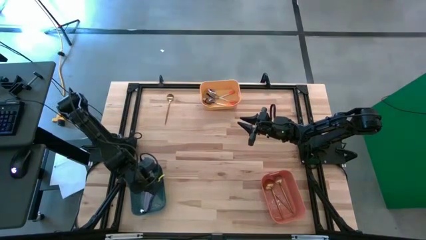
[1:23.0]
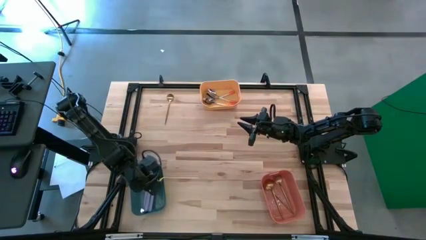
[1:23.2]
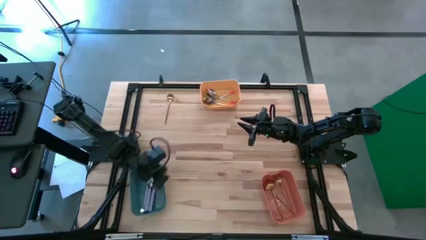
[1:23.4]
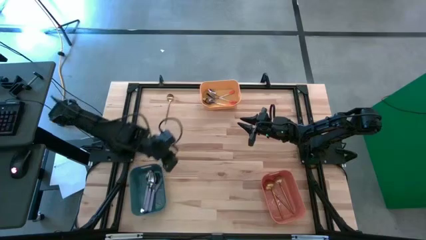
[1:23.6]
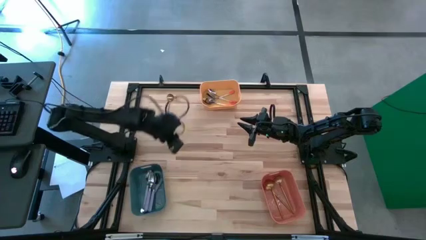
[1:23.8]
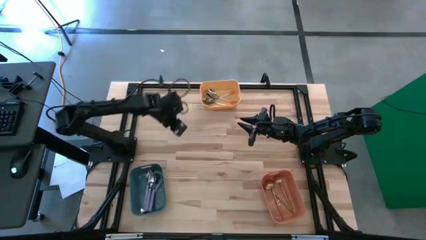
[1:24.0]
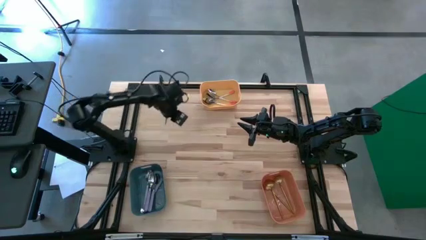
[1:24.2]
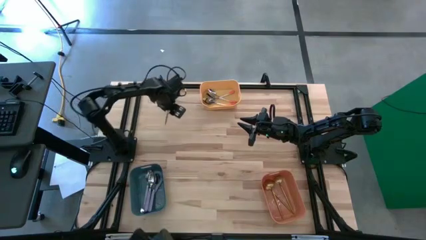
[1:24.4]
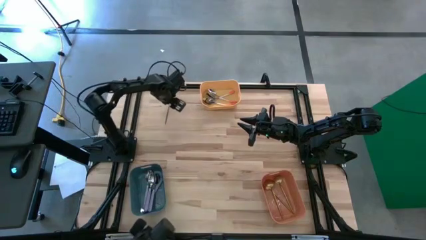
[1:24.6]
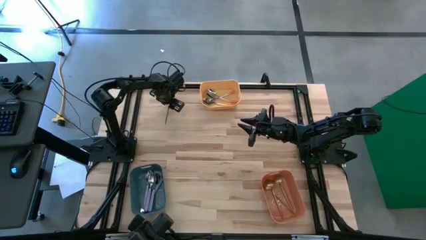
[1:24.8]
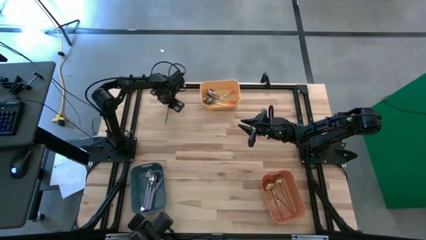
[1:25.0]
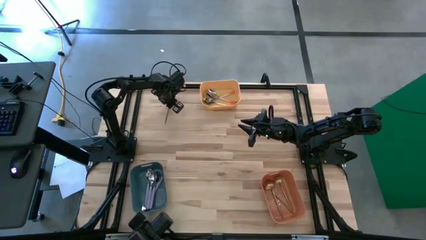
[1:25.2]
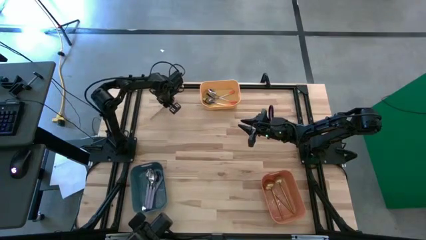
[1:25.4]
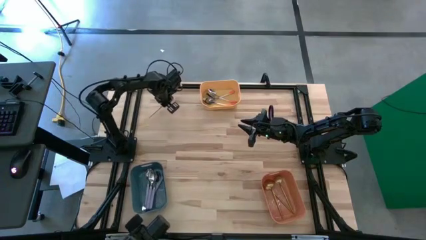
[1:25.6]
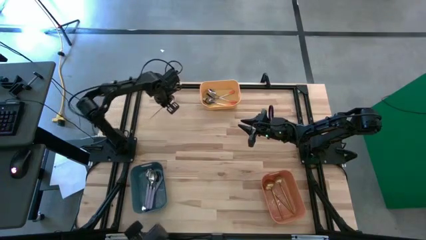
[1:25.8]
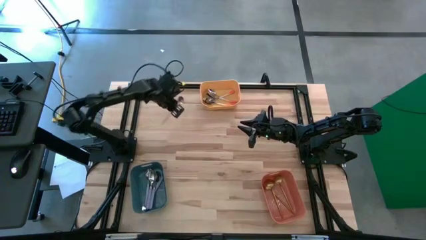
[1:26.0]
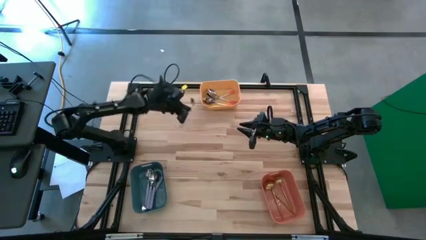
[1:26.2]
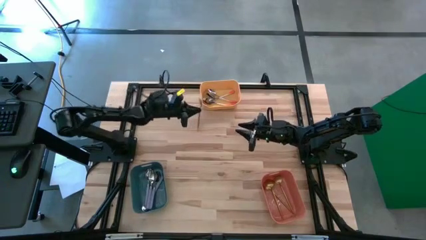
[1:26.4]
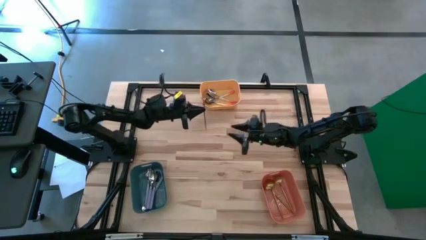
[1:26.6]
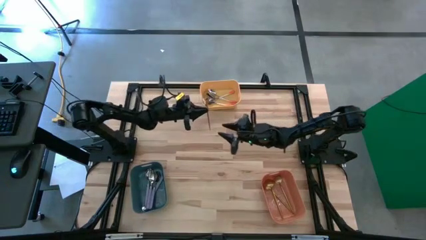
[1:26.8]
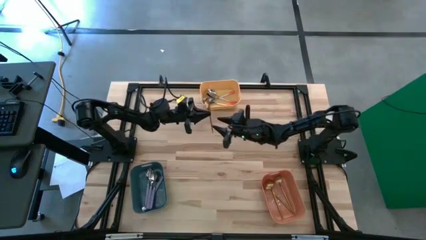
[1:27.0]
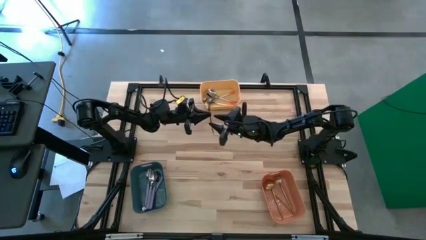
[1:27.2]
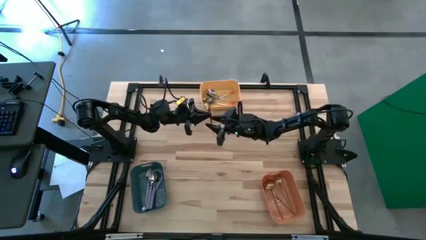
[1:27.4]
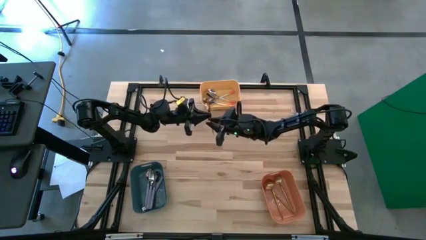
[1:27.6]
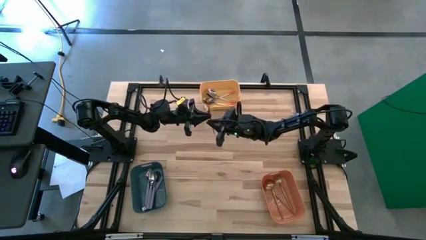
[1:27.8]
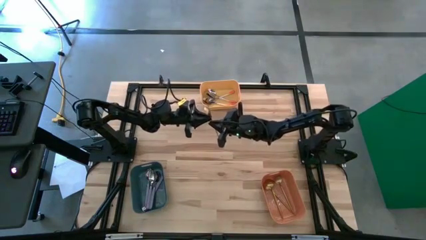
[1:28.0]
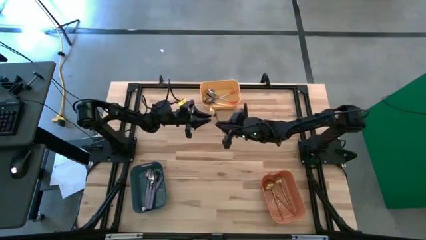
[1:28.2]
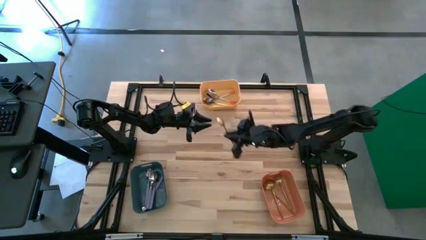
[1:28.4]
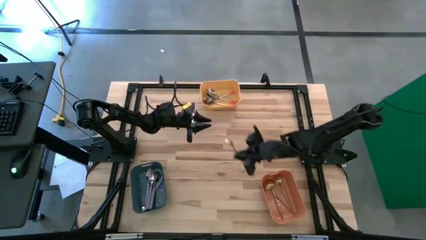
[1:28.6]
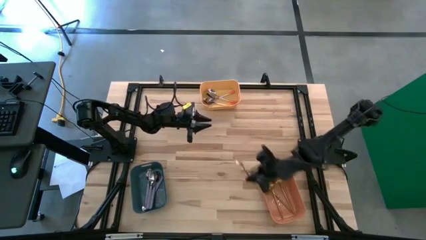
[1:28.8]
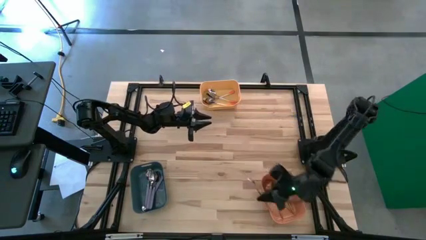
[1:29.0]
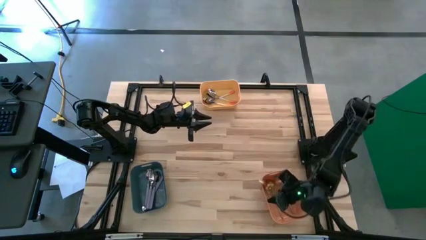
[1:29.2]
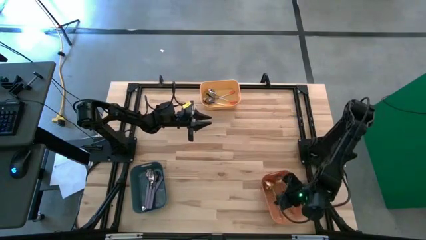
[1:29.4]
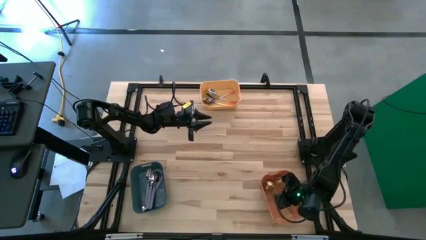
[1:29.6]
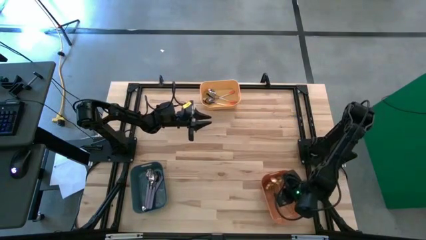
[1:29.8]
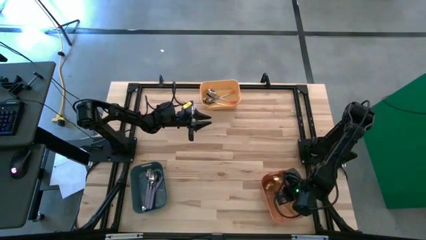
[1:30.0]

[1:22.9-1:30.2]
Task: Sort silverware by color (type)
Put the golden spoon into the orange bin

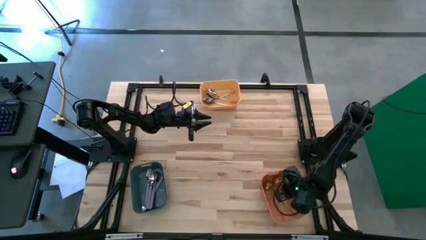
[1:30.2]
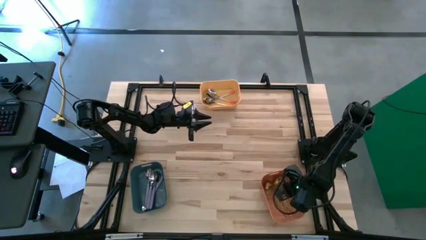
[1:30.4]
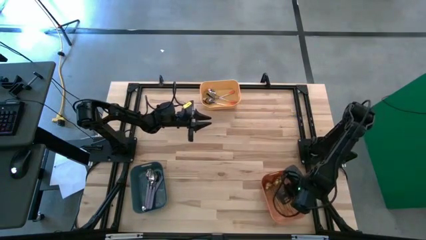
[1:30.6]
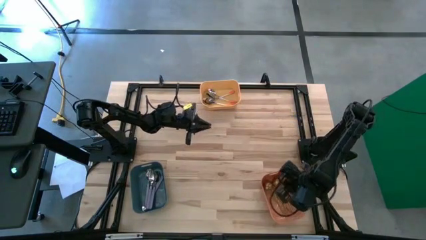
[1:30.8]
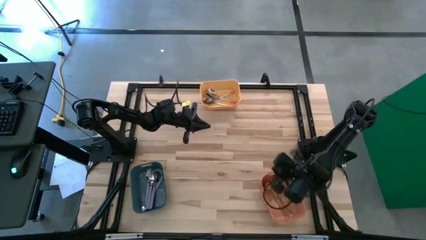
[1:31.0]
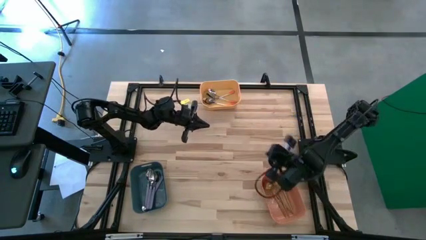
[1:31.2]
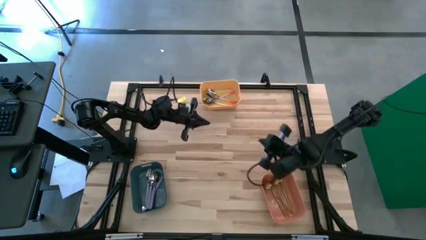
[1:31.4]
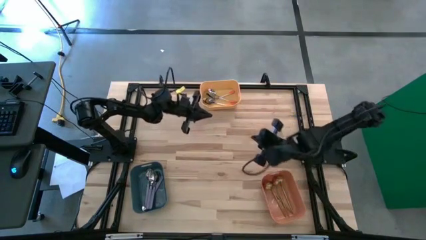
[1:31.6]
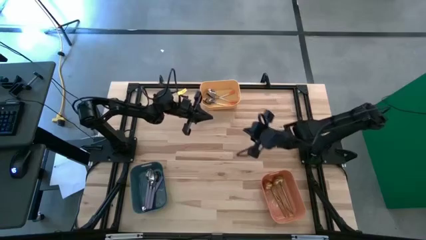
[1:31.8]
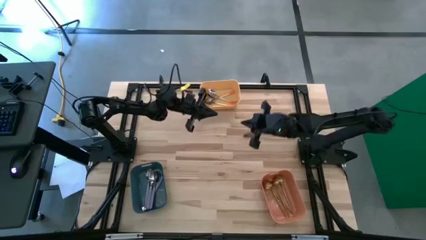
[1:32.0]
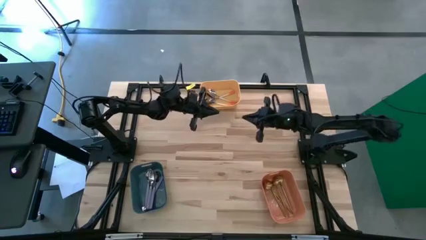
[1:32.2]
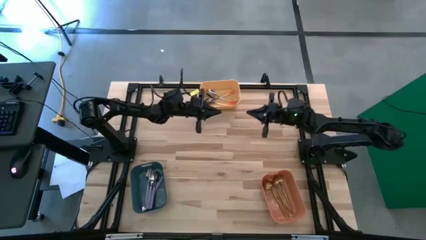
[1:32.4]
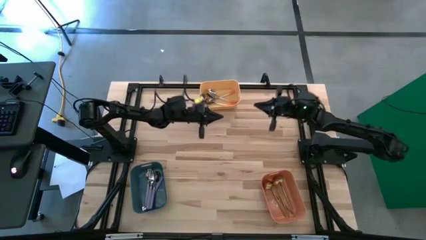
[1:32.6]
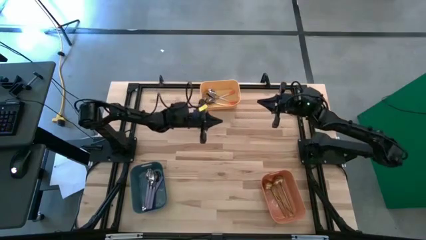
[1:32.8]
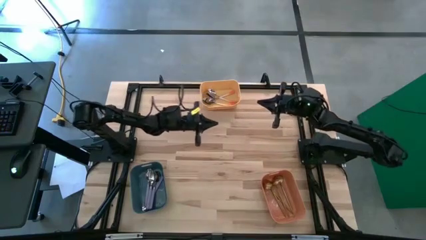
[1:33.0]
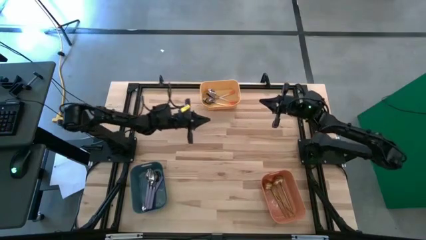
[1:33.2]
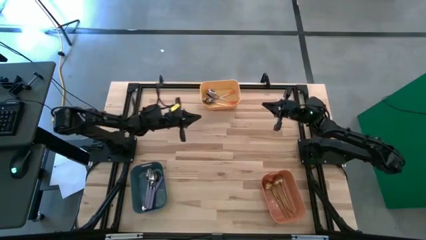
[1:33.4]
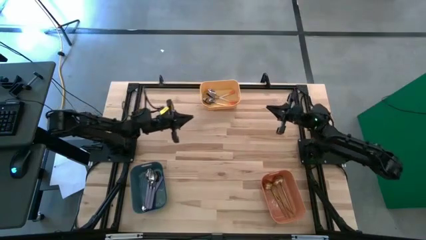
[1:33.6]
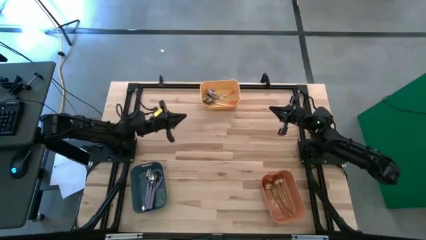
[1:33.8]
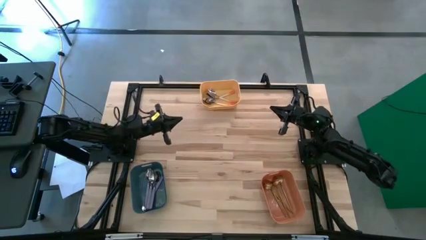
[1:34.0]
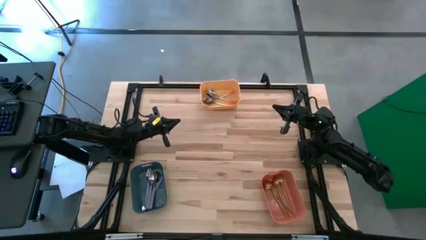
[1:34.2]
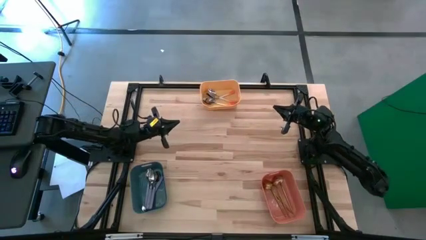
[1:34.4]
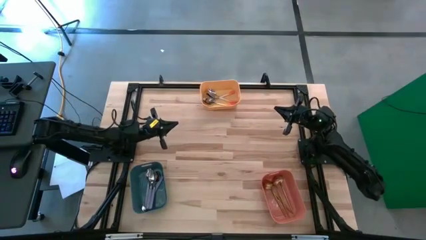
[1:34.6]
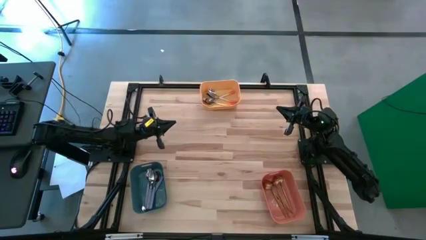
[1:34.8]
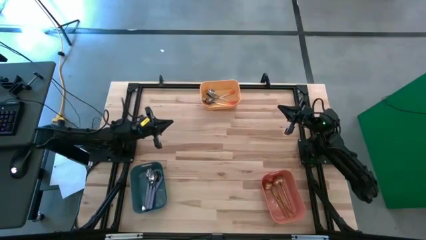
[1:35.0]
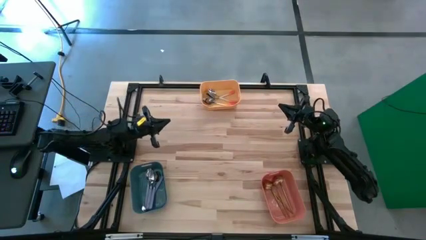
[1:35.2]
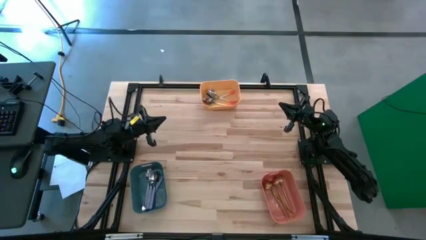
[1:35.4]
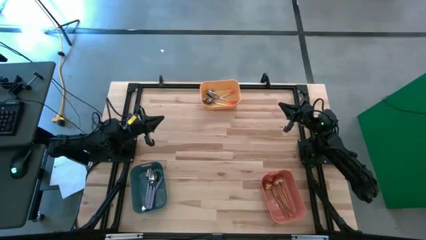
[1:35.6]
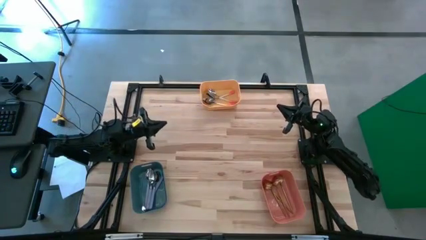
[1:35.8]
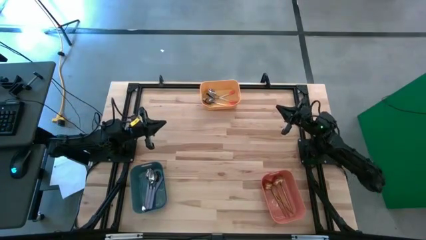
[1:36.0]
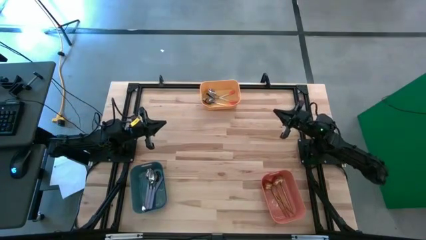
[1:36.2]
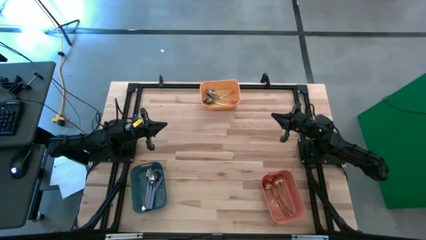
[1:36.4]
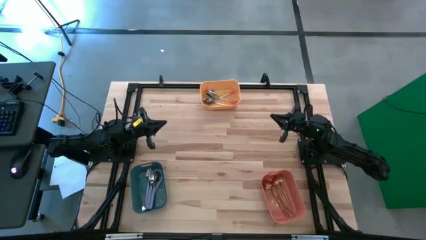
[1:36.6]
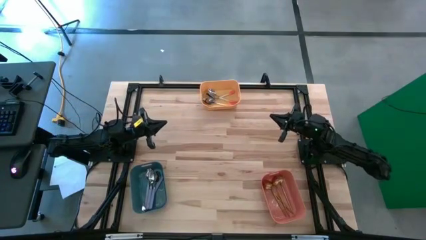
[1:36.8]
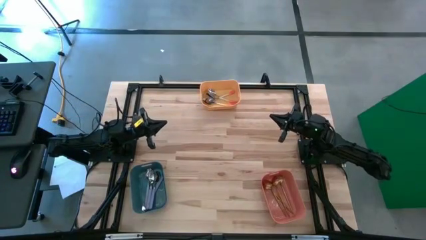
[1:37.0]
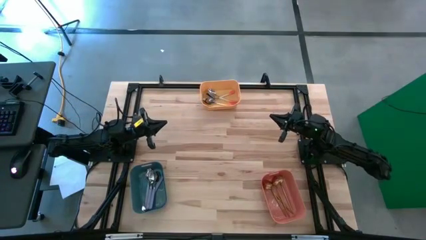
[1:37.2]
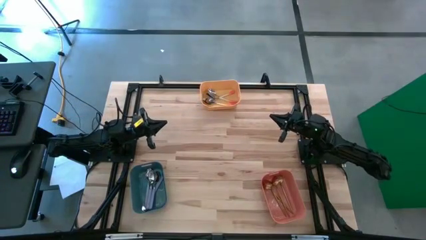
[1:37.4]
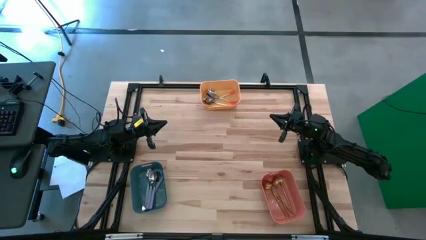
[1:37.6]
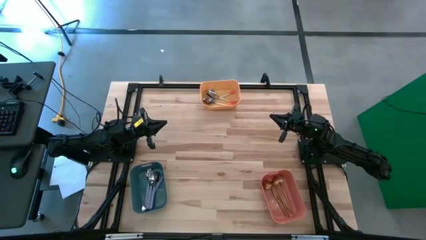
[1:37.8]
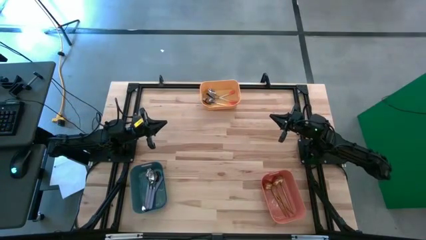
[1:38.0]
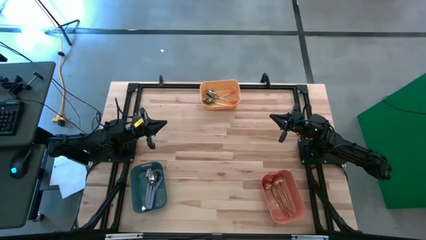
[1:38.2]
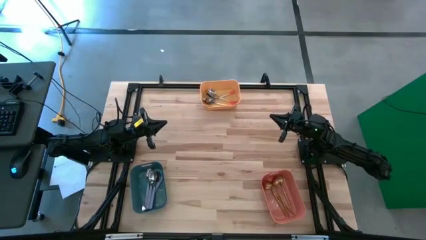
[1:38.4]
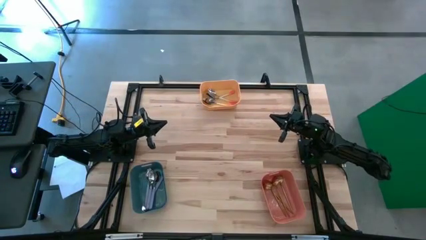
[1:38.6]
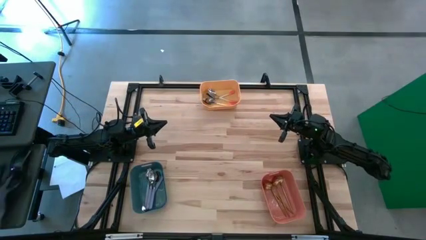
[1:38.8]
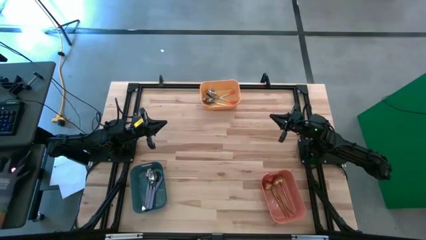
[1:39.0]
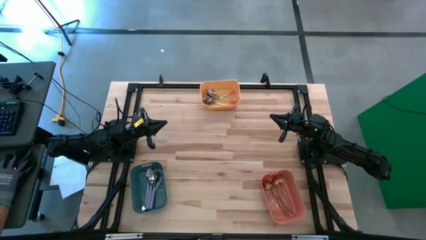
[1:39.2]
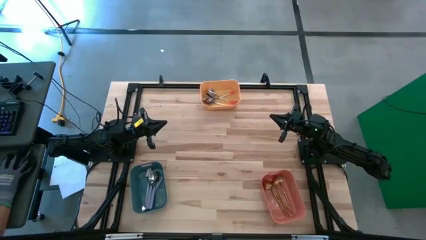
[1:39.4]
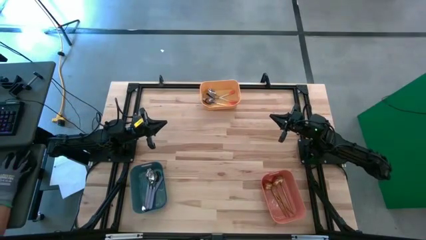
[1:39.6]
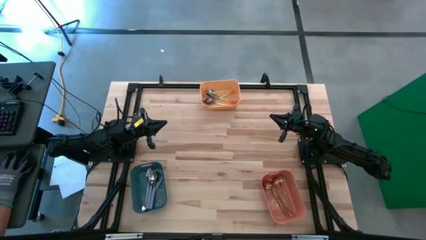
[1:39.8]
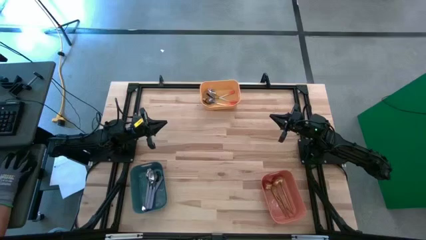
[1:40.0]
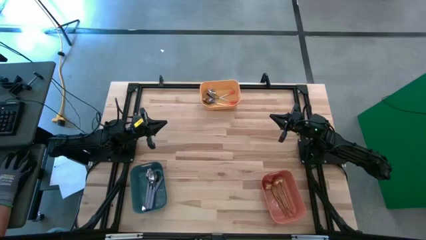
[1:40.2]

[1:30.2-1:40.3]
Return to Home Position
